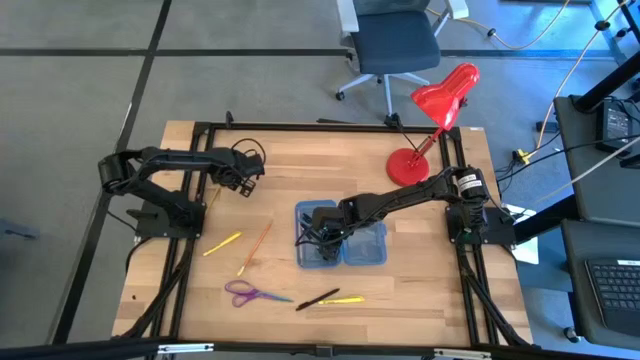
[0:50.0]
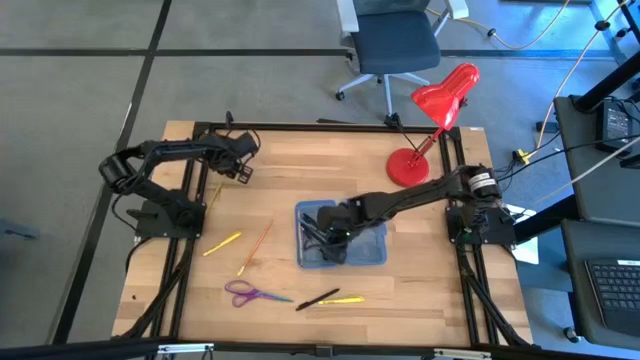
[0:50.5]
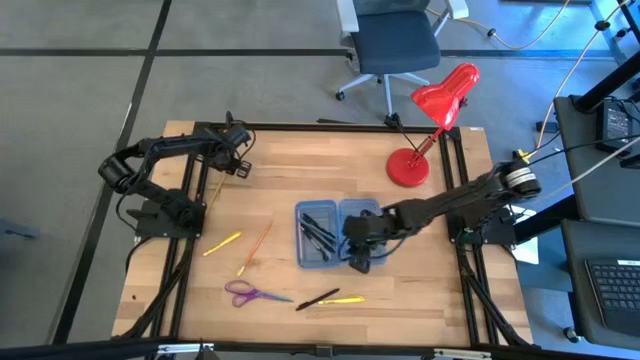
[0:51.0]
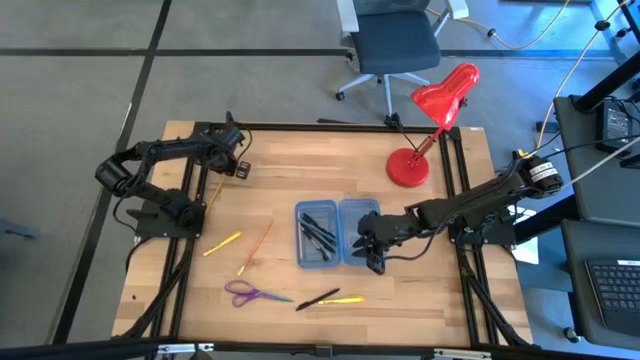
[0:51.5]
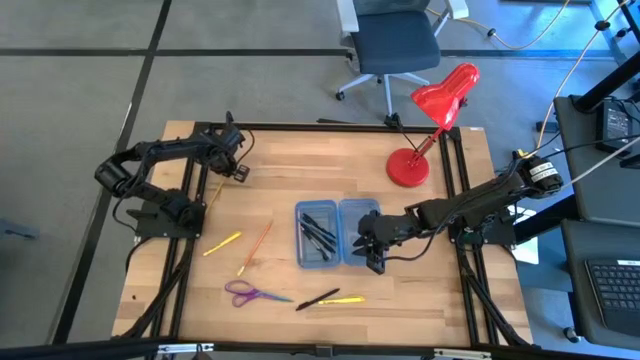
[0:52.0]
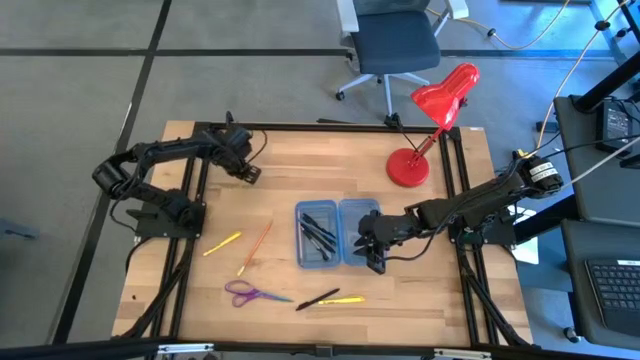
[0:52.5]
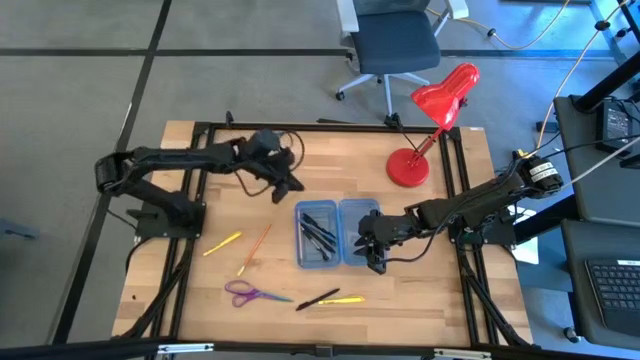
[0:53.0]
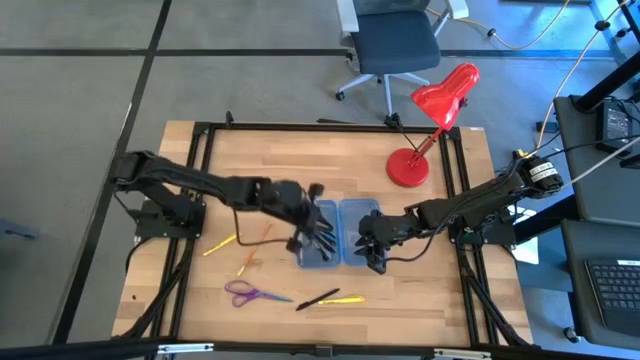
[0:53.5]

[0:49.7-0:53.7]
Task: Pick & place school supplies into a supply box
Put the yellow pencil into the blue supply box

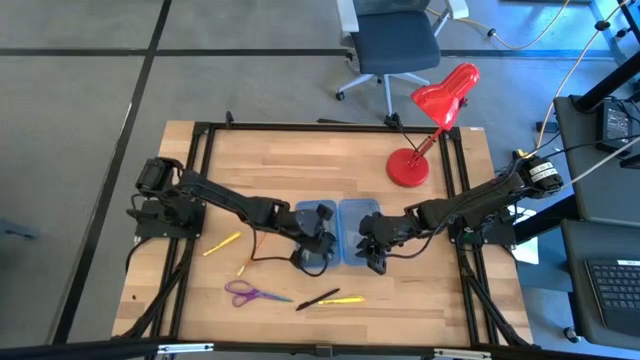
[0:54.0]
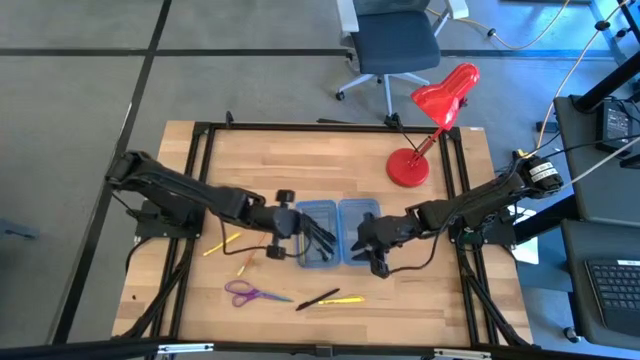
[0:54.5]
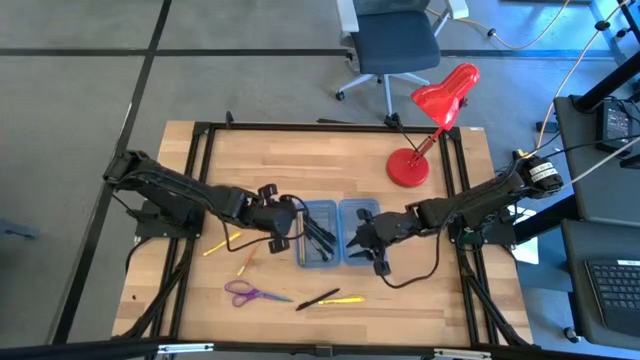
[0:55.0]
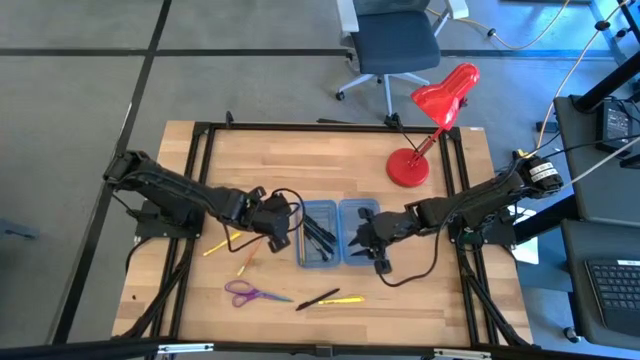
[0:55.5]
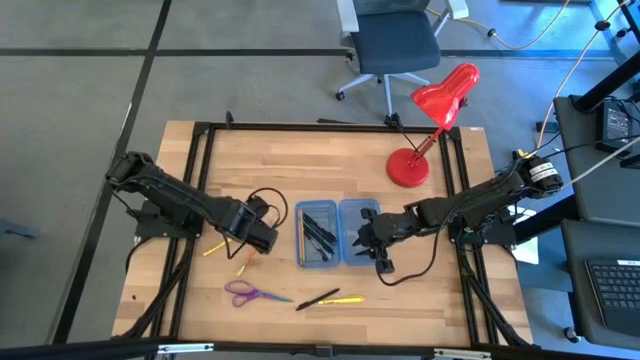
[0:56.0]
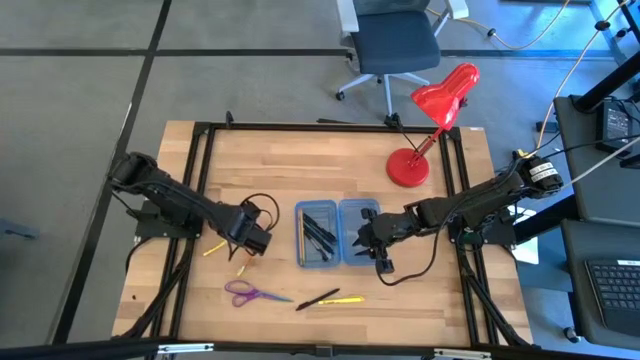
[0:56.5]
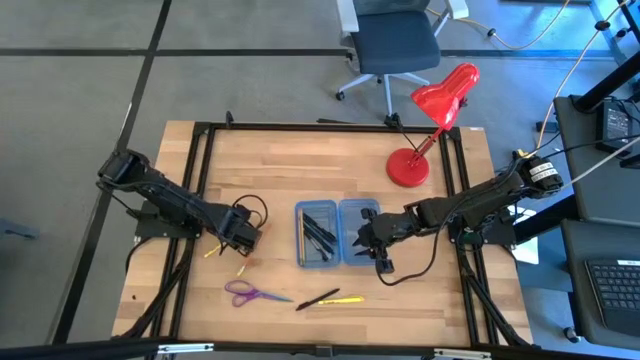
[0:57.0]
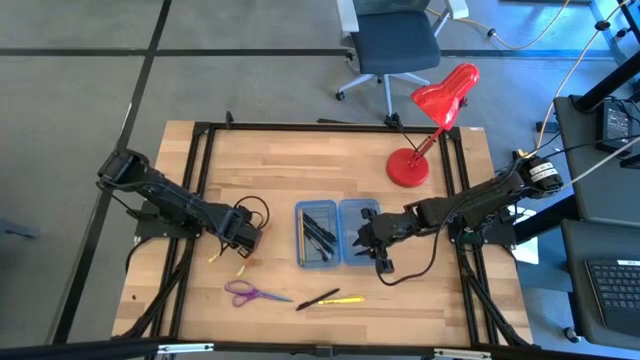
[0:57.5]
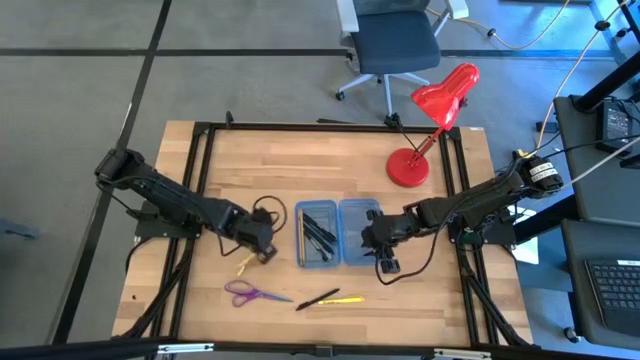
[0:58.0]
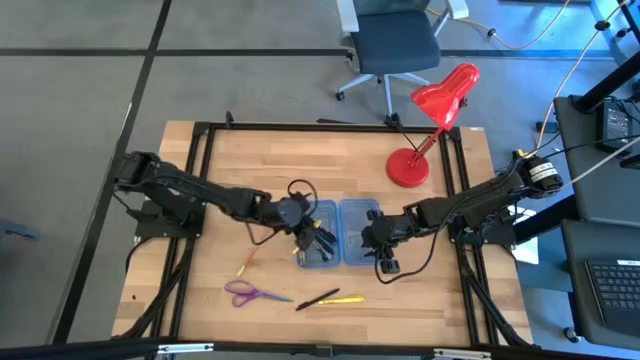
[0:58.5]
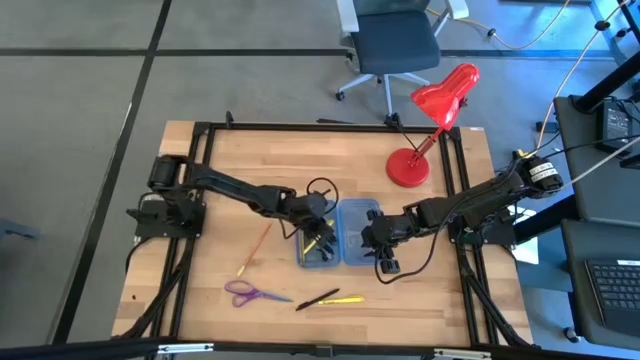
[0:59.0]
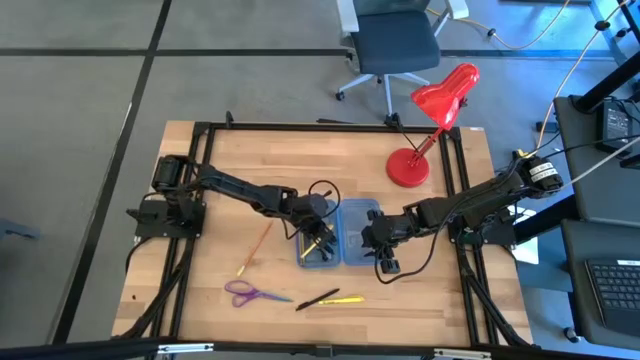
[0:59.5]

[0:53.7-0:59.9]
Put the yellow pen into the blue supply box

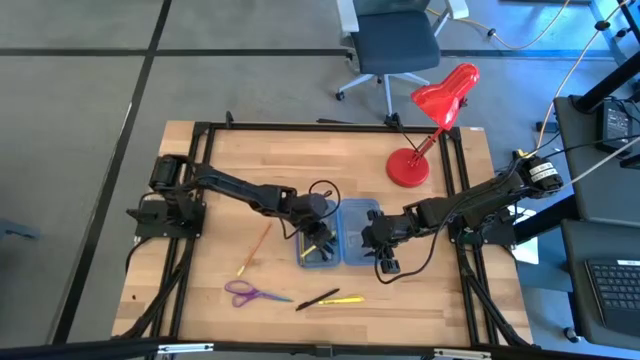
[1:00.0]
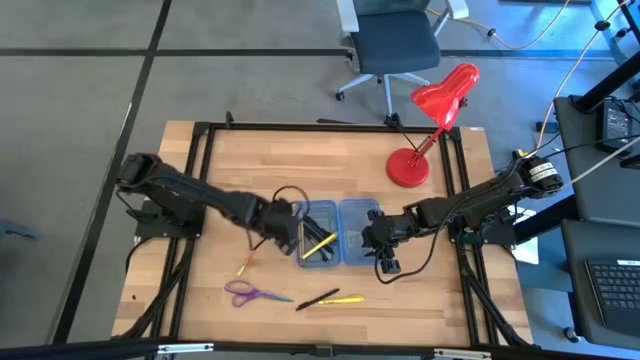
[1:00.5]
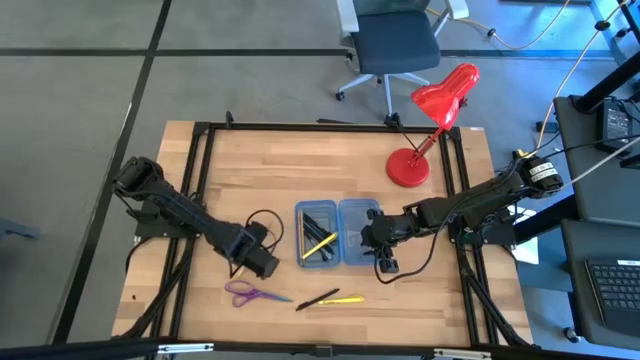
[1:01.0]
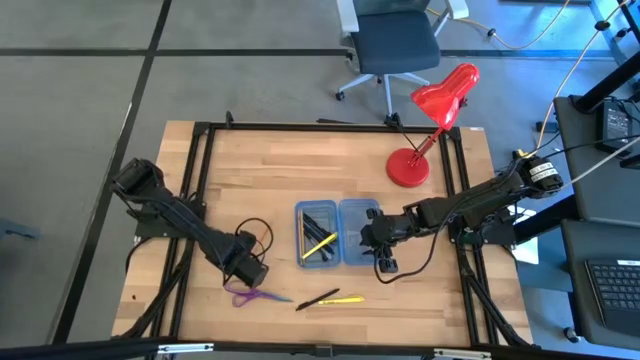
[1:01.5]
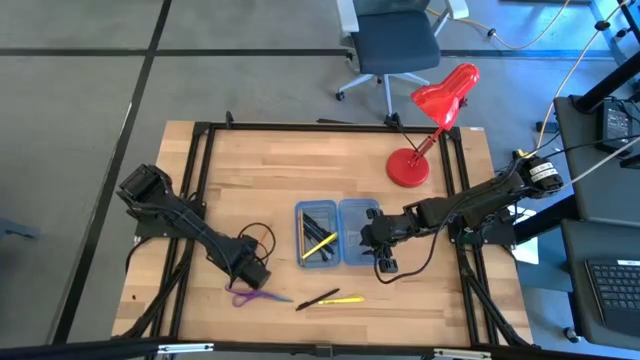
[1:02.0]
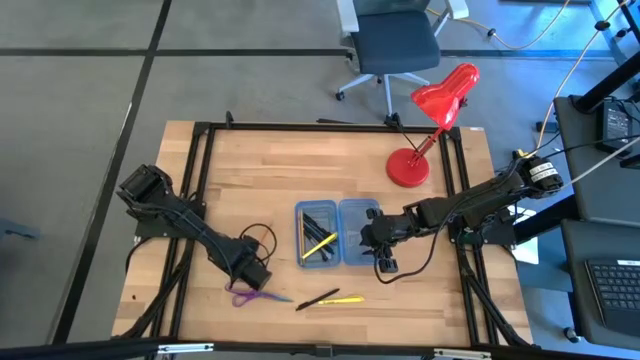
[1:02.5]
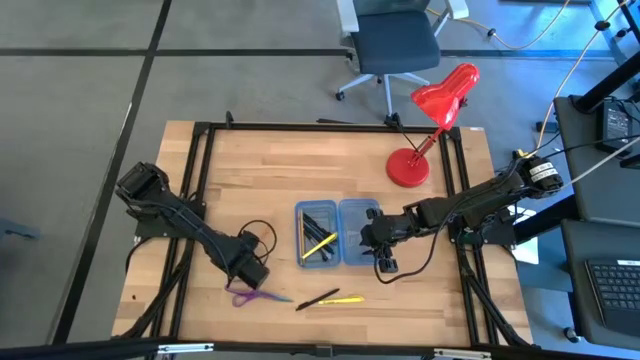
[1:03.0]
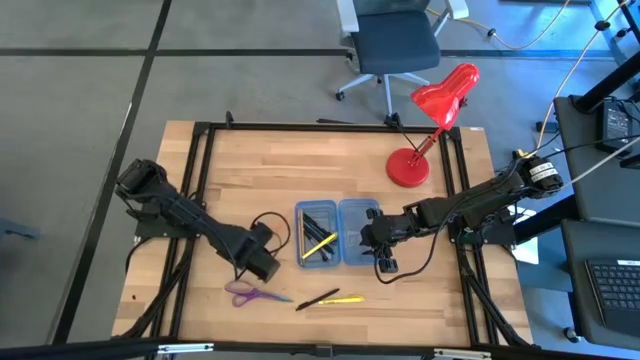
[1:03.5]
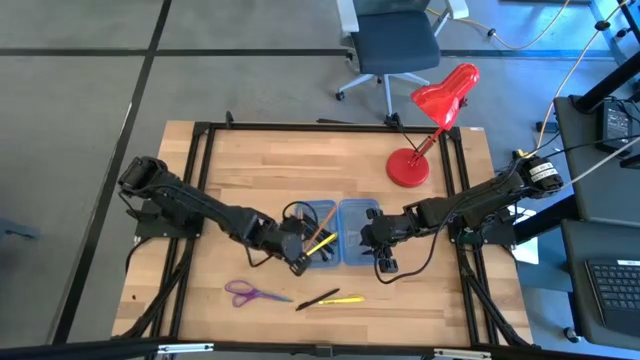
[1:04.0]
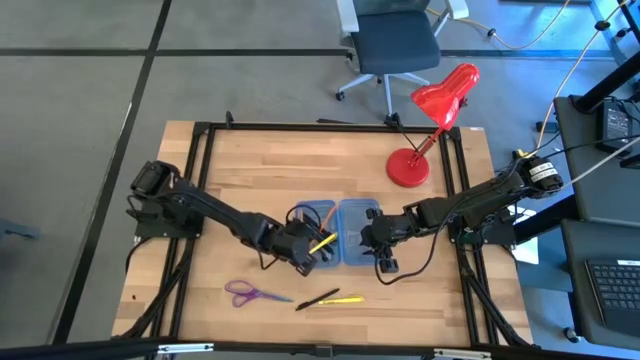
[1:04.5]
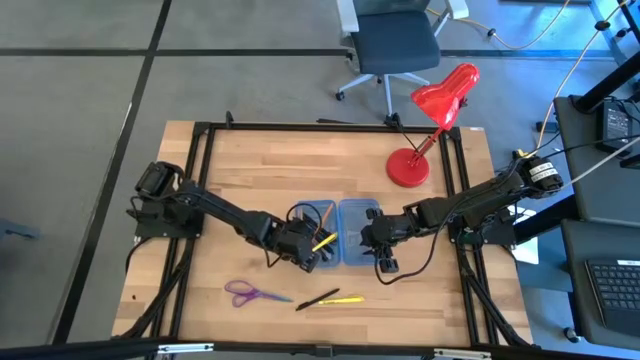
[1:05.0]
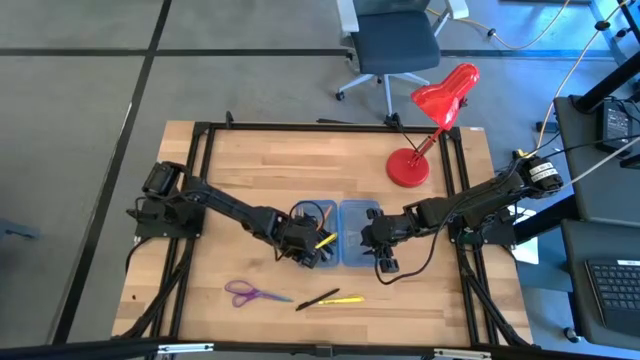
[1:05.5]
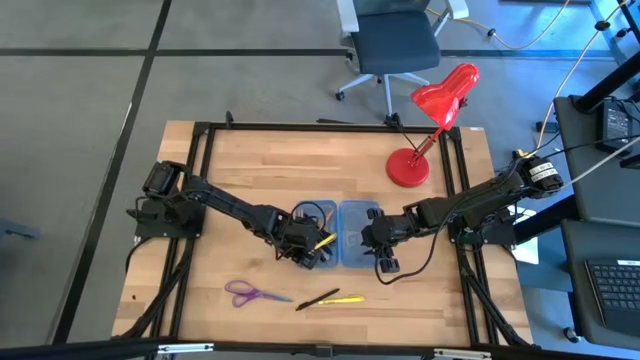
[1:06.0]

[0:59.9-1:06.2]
Put the orange pencil into the blue supply box

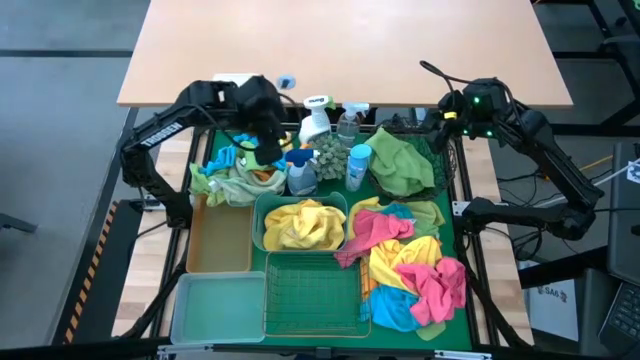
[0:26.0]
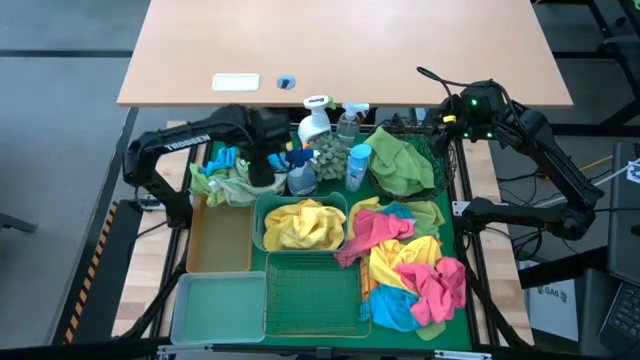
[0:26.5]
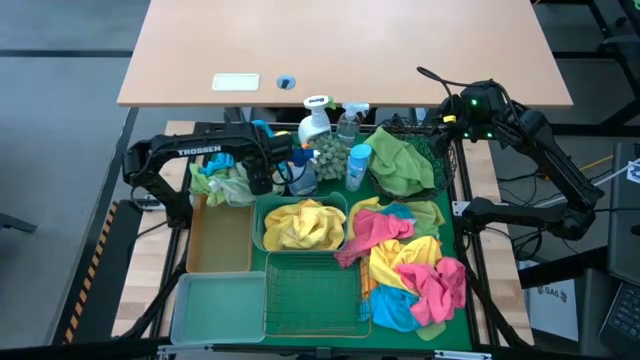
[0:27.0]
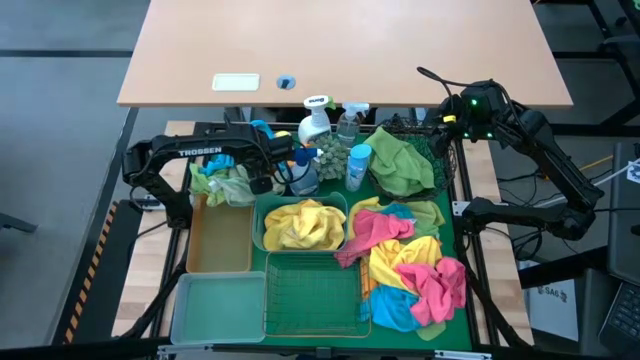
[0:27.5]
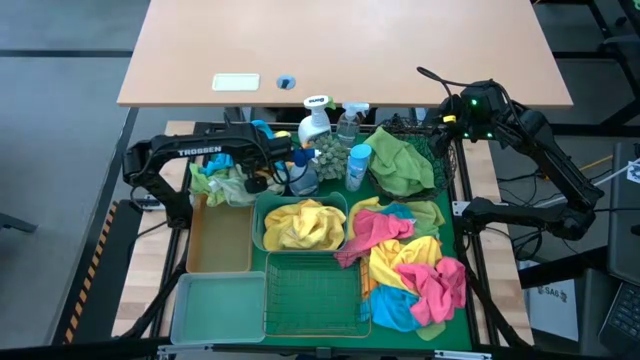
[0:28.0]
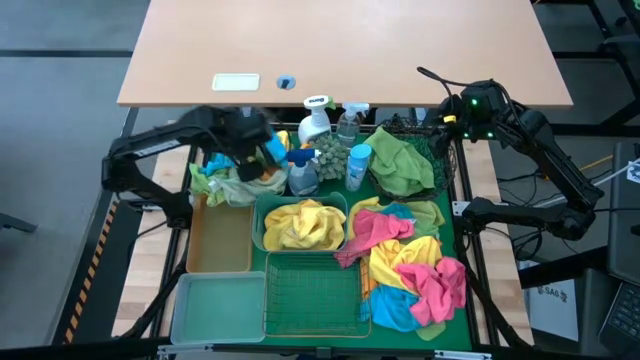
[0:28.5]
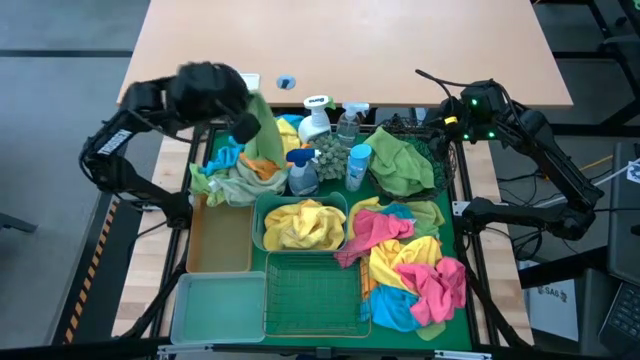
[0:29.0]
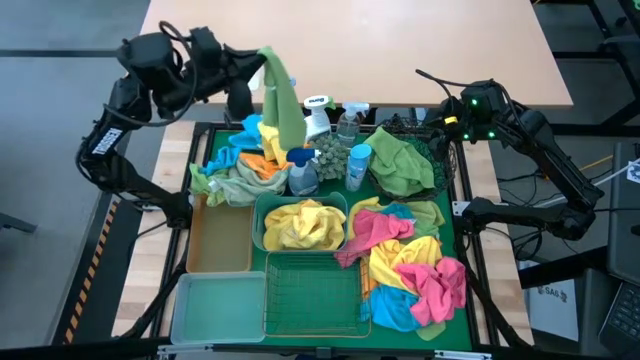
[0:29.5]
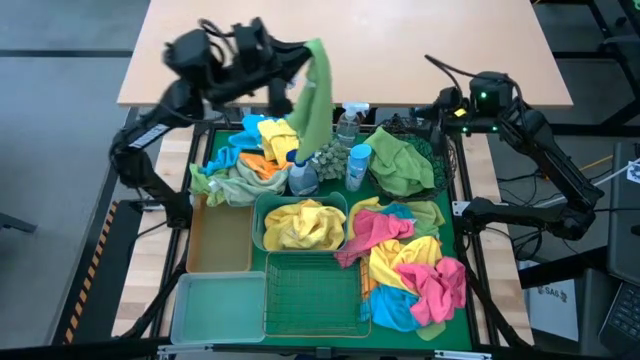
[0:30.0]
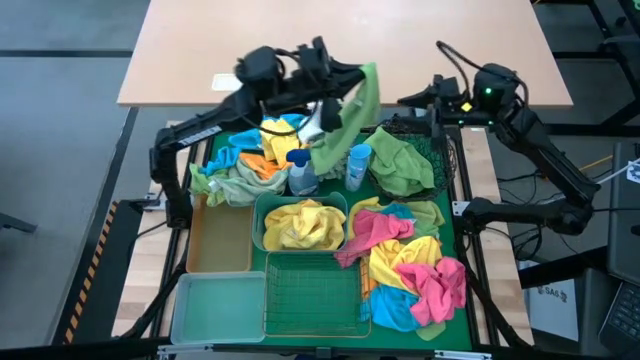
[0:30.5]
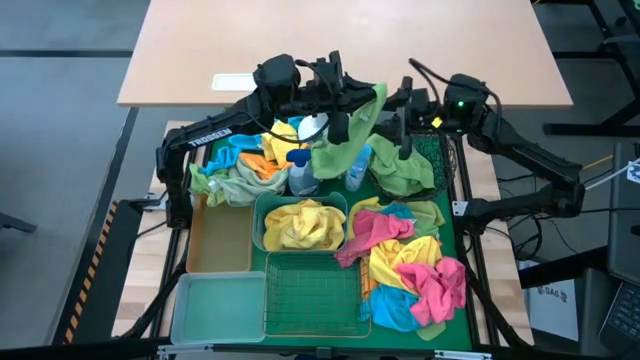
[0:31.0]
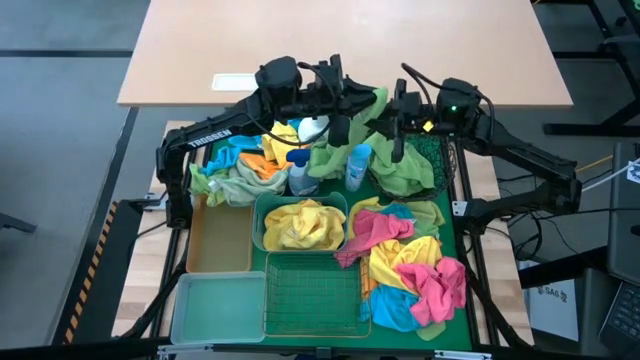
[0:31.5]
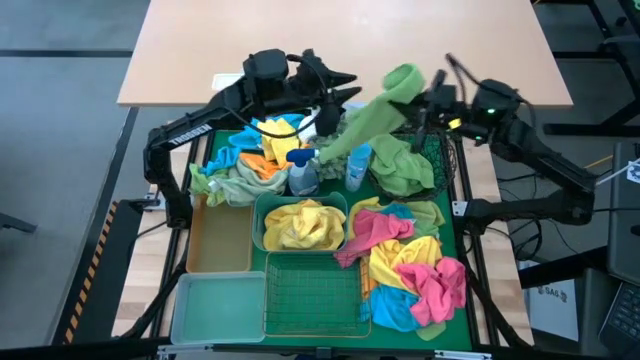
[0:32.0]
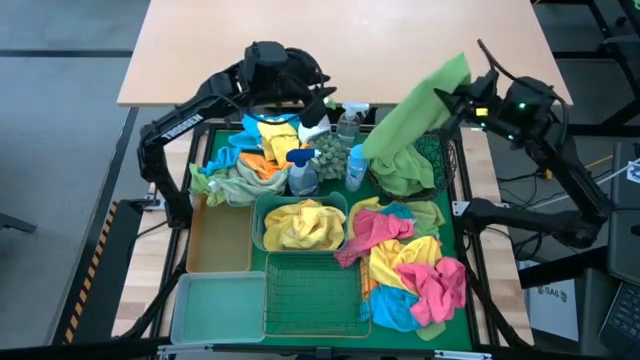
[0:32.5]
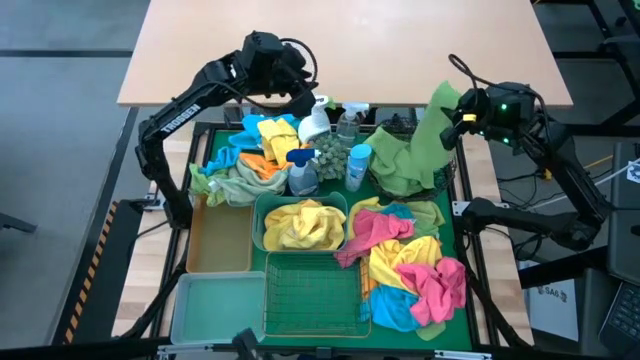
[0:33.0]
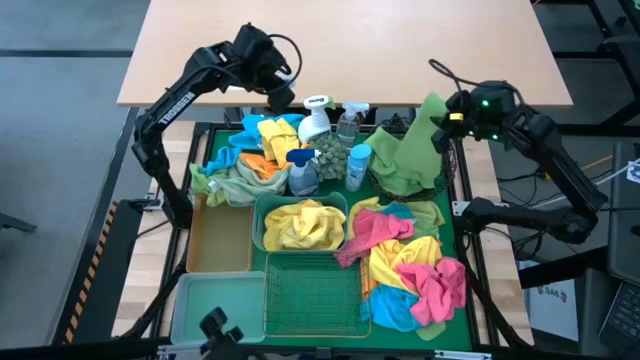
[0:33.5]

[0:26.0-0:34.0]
Task: Sort microfiber towel by color & place in baskets
Put the green microfiber towel into the black wire basket
